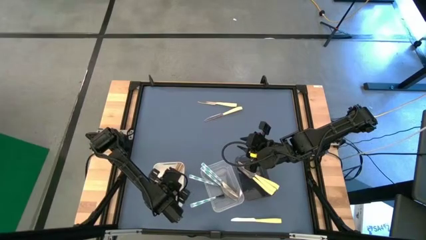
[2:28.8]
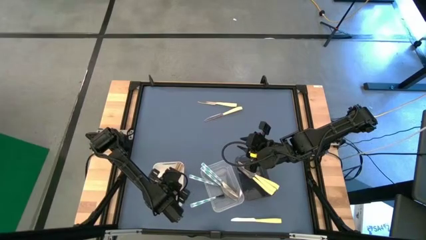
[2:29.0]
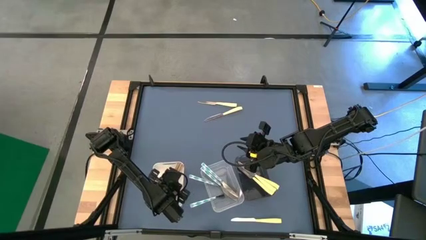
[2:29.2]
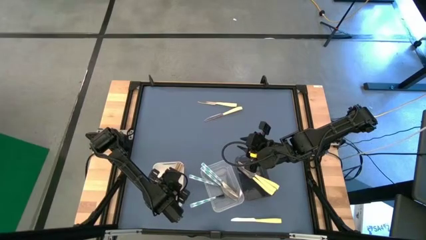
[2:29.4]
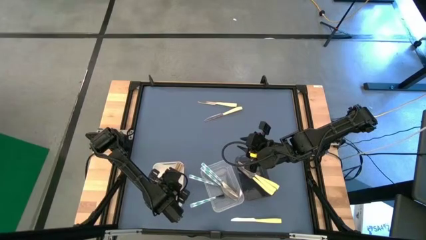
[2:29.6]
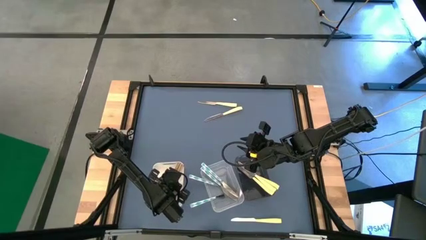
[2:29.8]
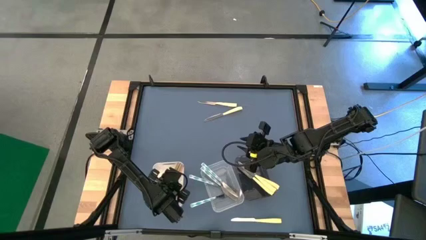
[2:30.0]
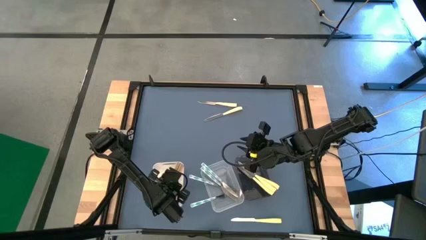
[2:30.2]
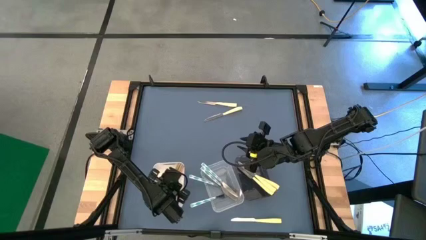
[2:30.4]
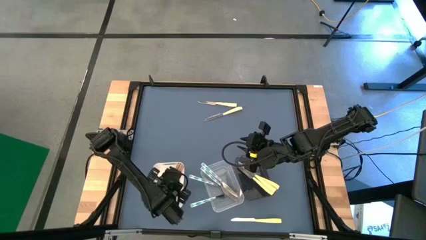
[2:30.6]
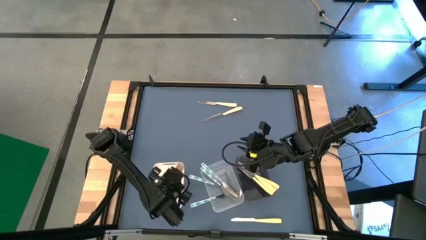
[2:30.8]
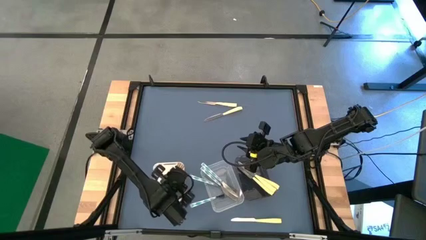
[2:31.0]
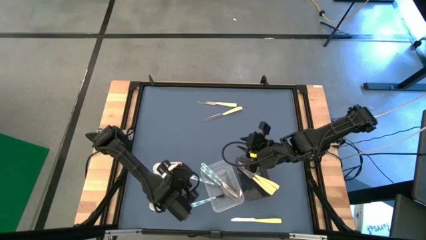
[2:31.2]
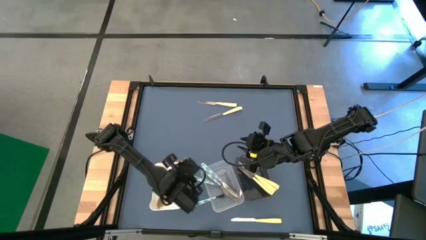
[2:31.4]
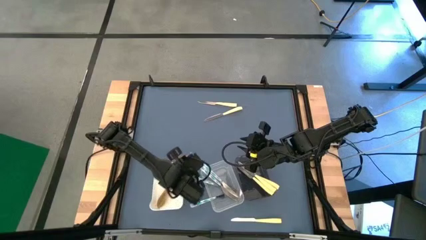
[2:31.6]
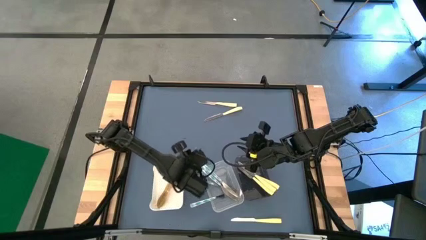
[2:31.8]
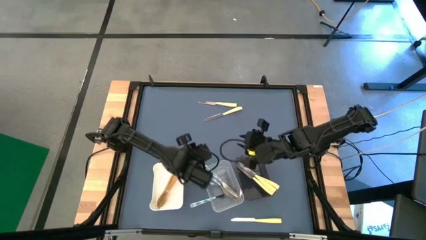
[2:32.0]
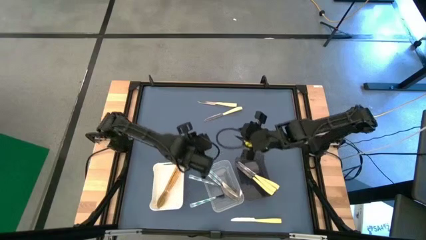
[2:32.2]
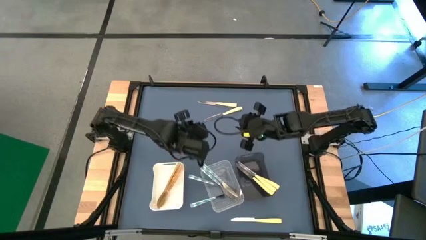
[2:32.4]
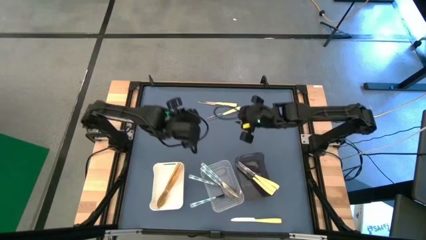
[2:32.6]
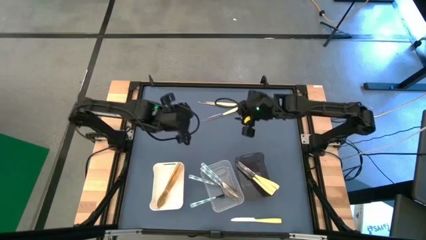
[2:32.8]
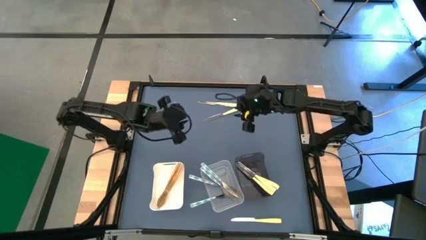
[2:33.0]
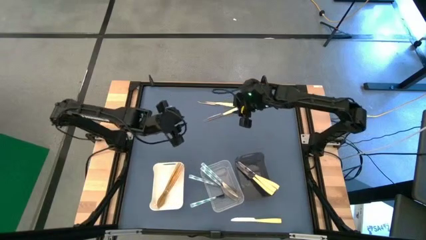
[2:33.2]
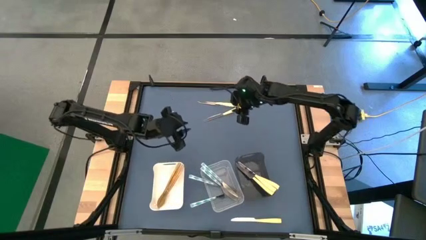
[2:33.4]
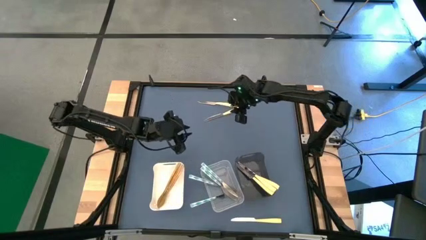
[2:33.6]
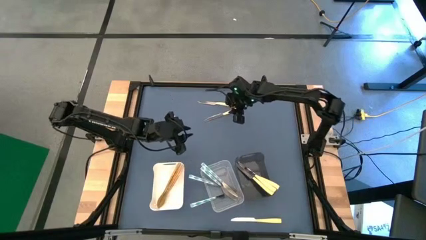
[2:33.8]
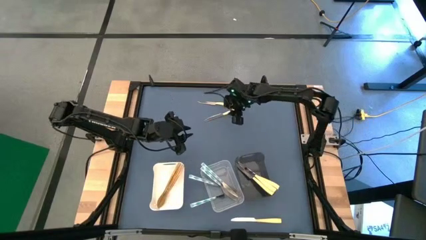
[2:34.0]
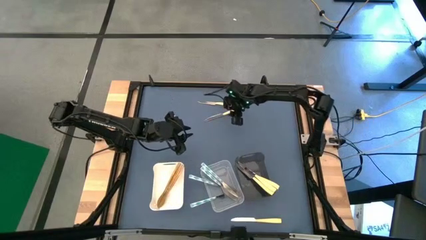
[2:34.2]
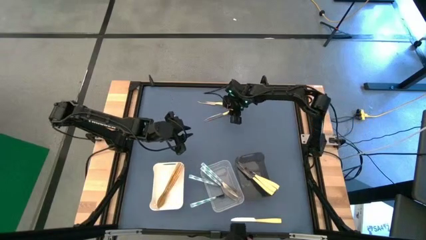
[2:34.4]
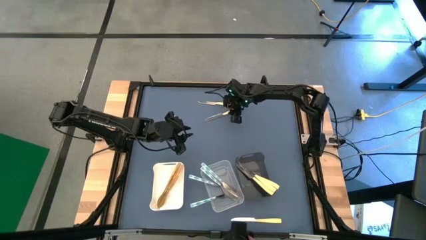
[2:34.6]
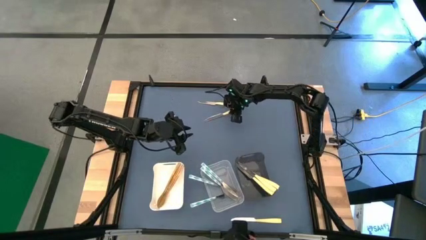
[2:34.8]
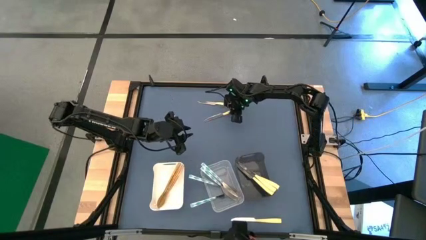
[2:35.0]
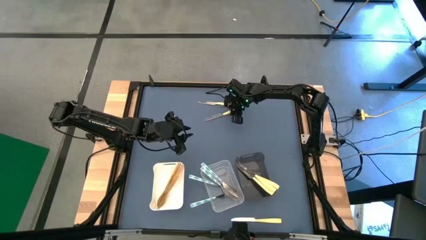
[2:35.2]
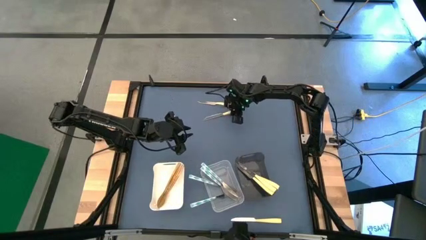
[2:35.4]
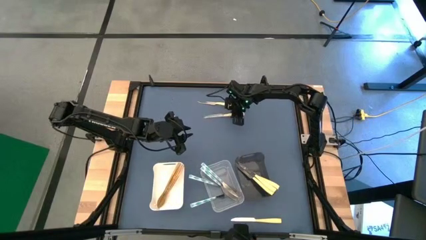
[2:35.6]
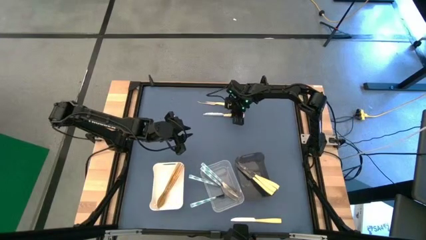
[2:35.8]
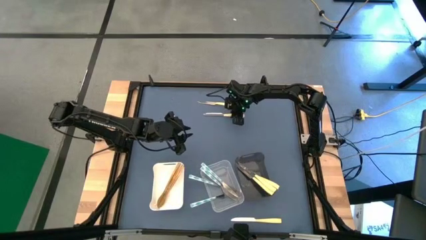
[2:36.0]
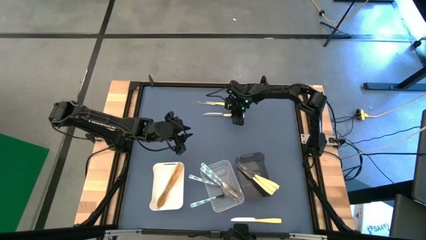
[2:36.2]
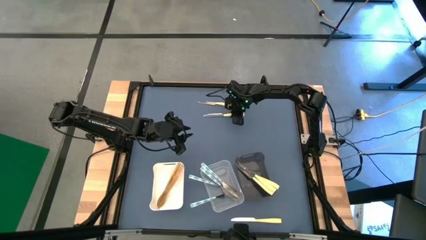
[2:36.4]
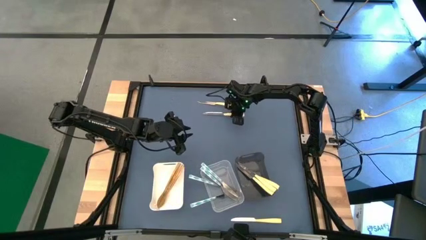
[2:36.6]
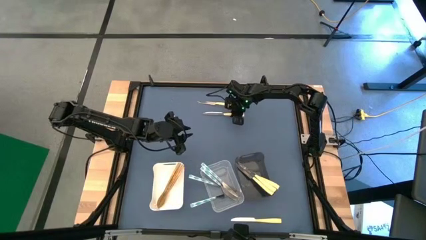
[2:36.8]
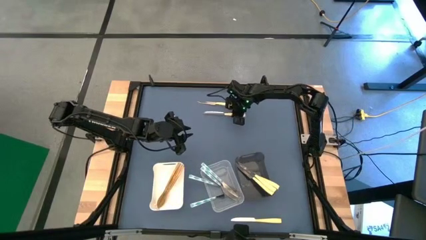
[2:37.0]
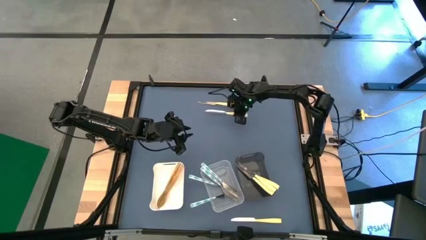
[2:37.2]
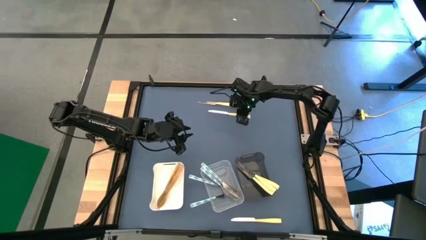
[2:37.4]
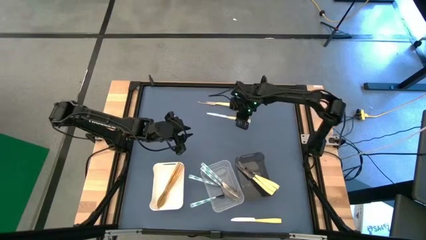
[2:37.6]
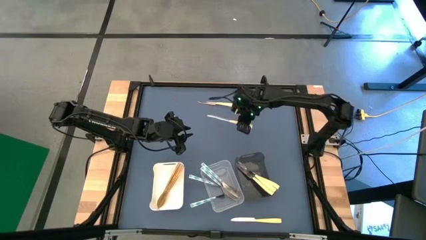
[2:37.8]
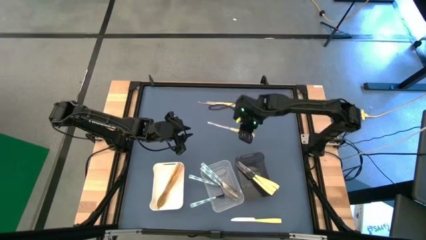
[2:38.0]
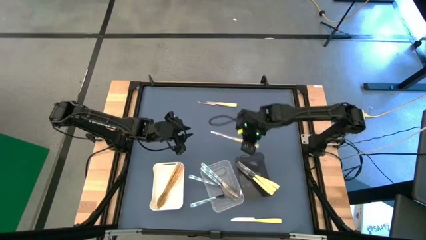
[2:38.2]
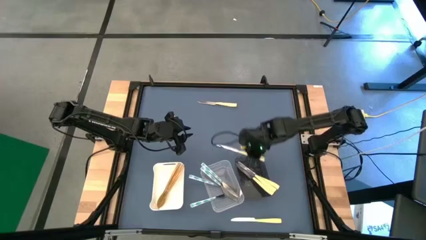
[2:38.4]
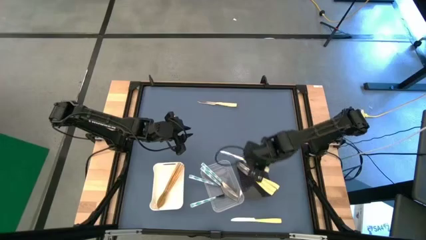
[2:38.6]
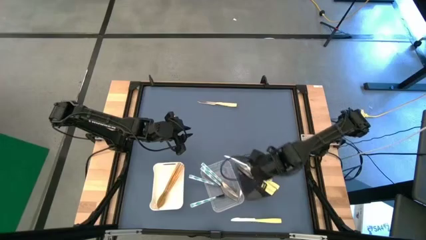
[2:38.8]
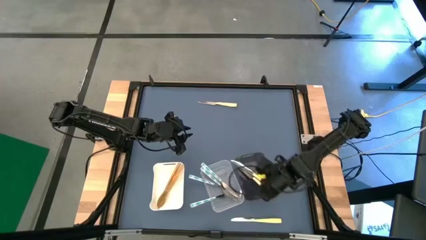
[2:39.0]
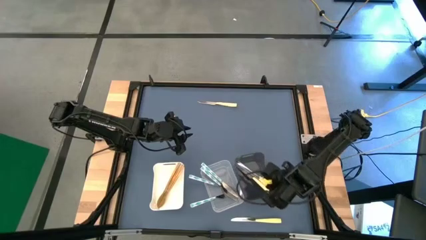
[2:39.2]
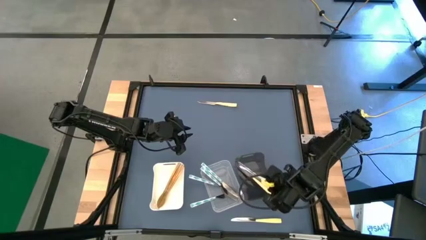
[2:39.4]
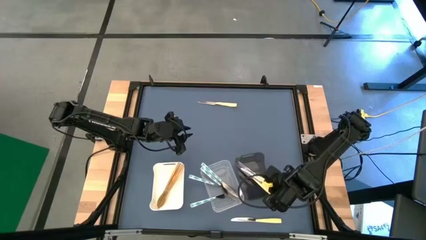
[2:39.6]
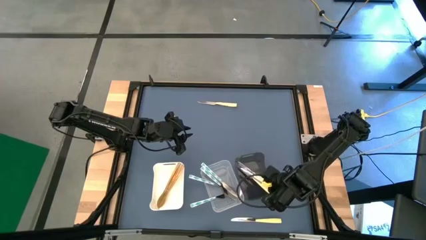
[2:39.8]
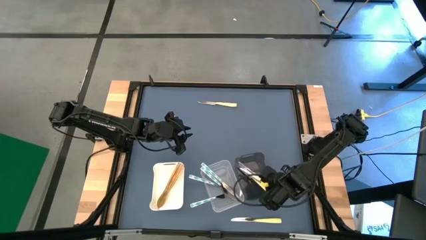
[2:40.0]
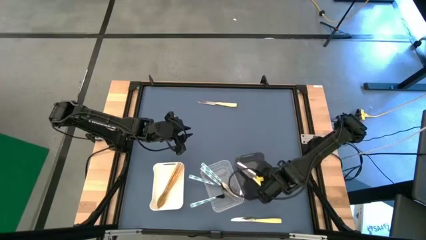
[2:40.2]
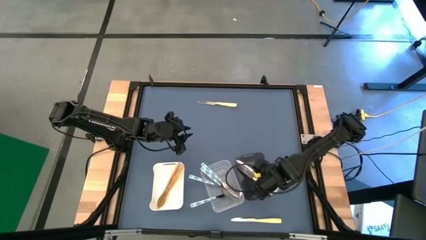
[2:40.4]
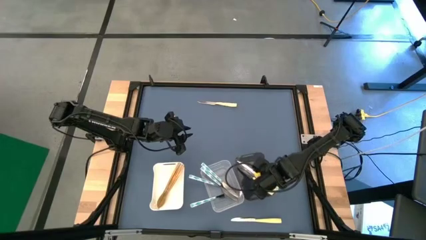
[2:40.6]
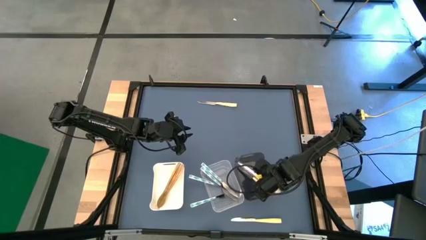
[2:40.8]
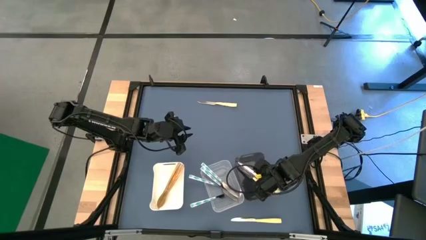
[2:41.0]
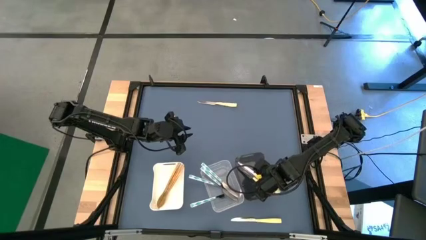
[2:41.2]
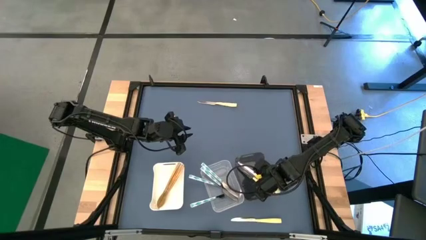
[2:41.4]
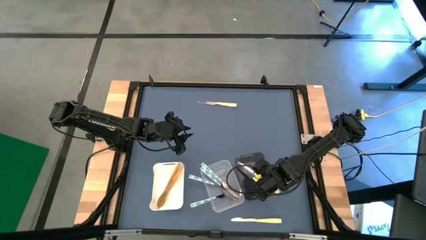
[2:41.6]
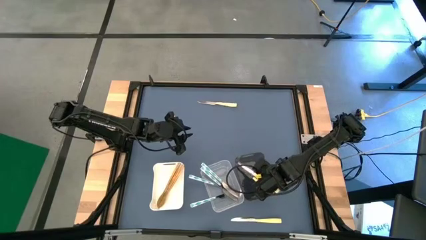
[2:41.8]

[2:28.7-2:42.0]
Task: Sort silverware by color (type)
Put the yellow table knife into the black transparent bin

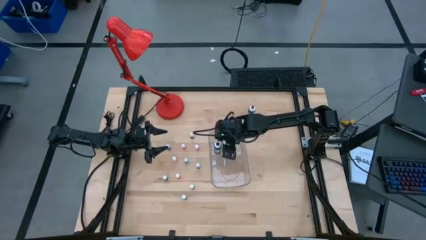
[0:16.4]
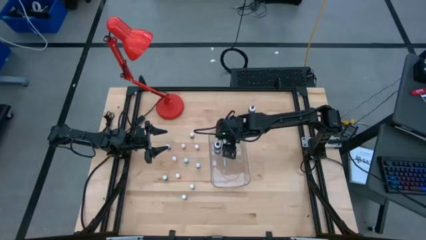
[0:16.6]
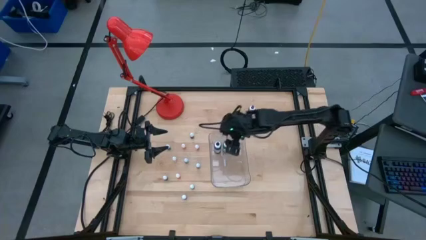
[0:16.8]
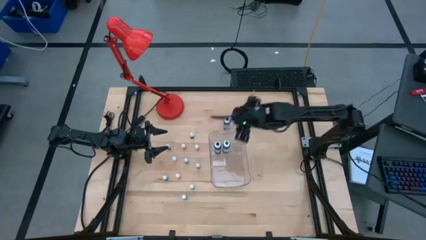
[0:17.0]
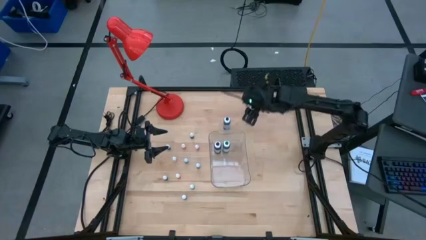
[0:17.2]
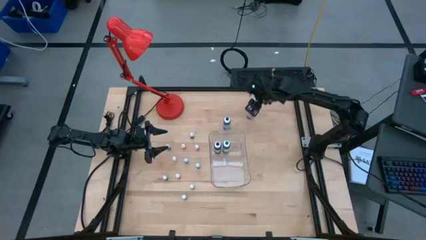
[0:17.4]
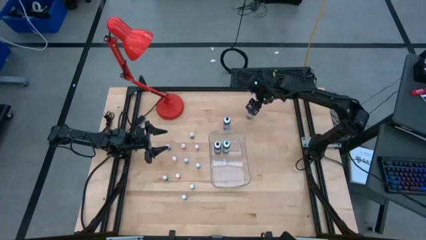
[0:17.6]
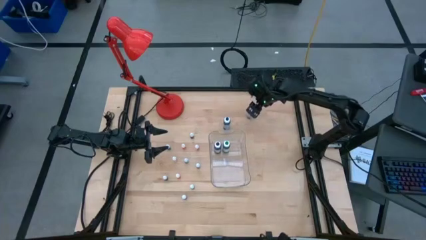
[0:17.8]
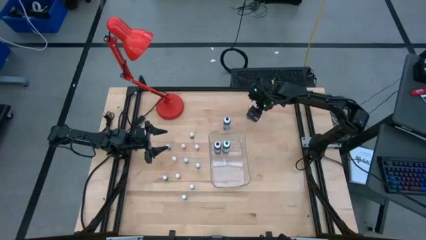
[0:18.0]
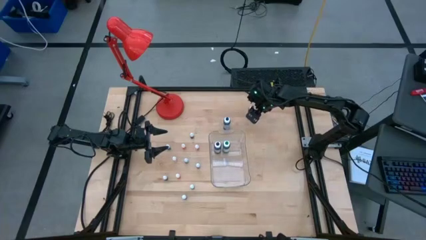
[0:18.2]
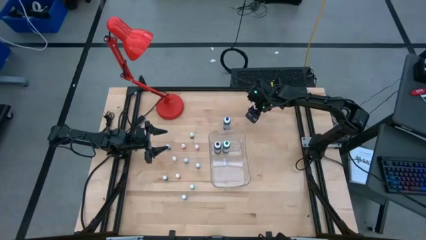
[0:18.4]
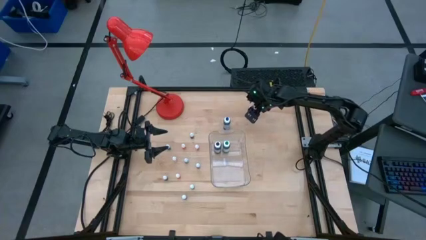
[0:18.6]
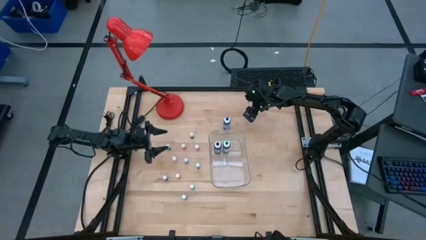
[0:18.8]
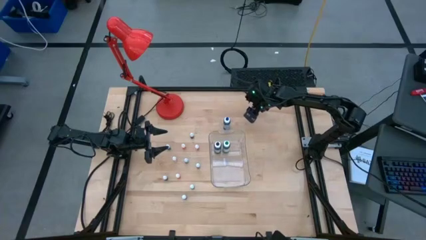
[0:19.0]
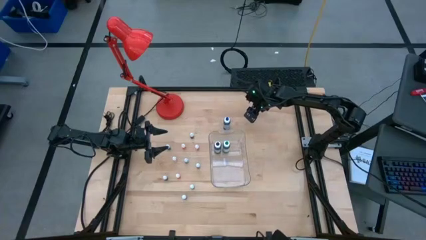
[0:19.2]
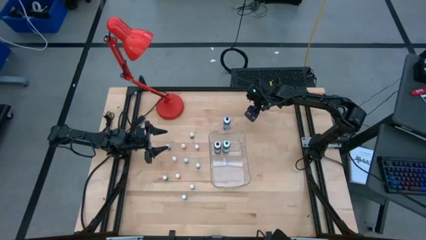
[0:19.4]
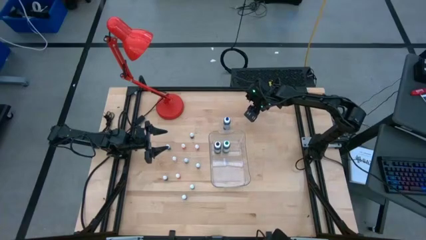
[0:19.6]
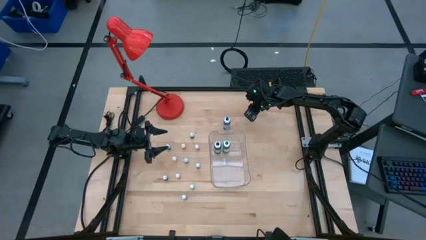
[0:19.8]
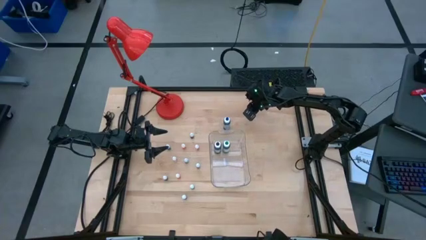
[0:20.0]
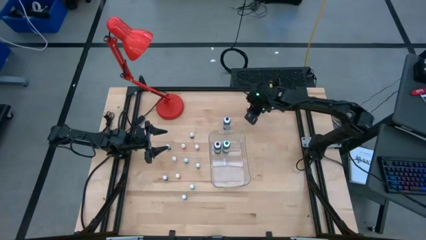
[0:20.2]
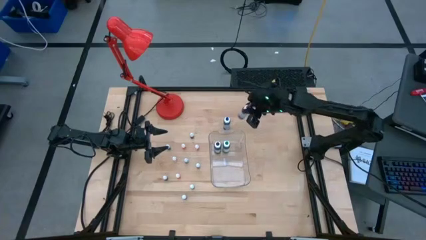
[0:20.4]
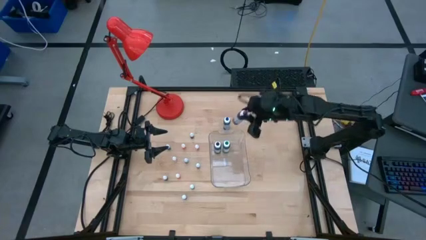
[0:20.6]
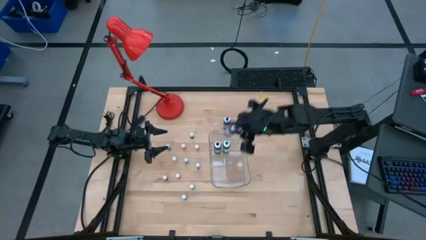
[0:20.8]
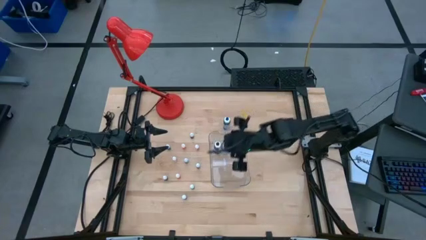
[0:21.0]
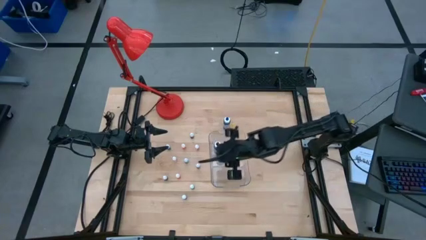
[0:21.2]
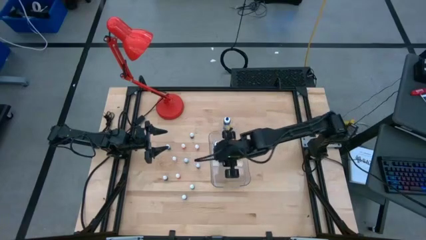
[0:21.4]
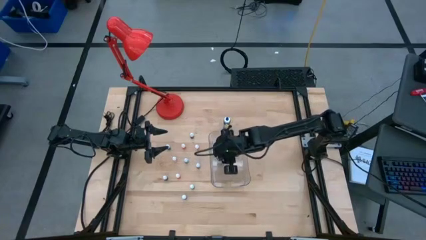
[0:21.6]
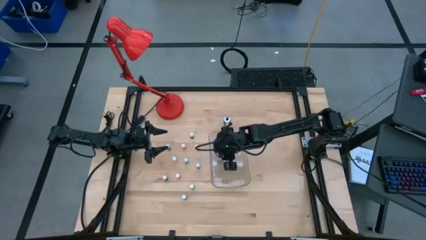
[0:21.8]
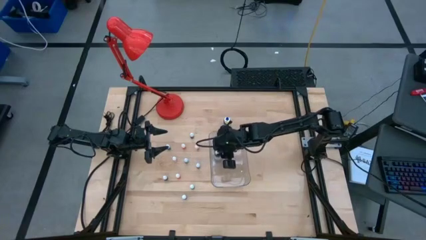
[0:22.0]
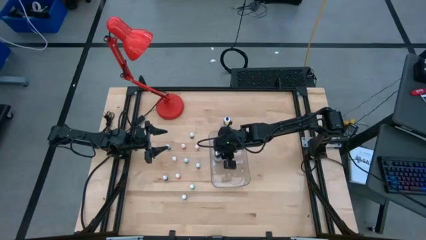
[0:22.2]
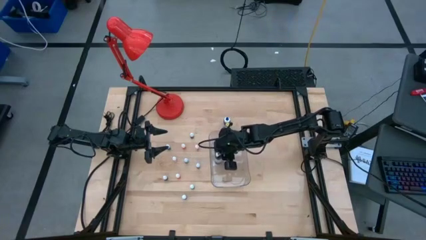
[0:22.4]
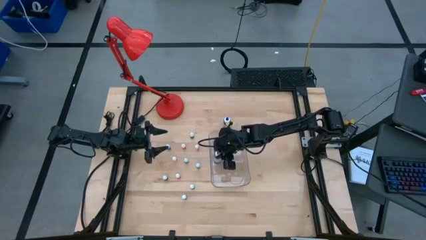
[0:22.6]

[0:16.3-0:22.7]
Task: Pick & Place food coloring
Put the purple food coloring bottle into the transparent container
